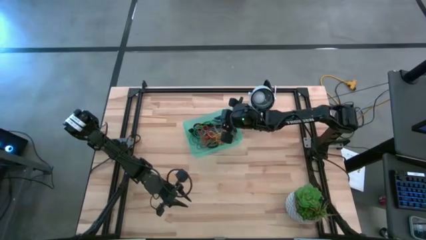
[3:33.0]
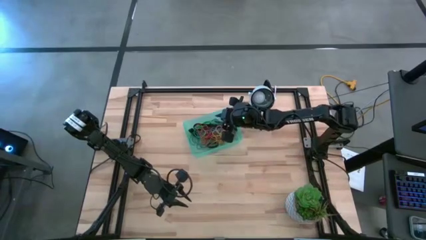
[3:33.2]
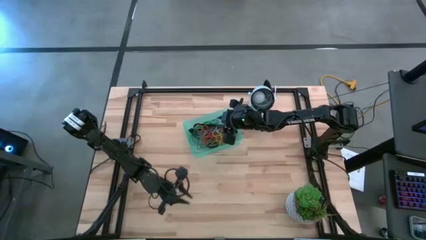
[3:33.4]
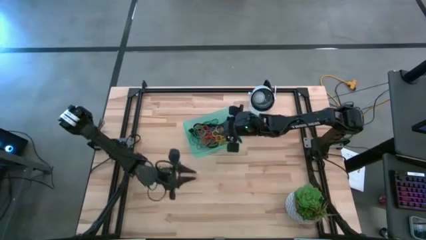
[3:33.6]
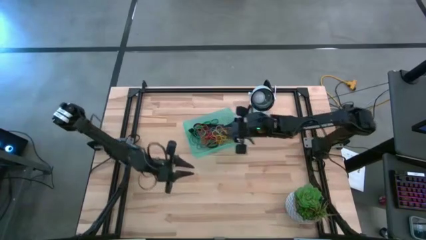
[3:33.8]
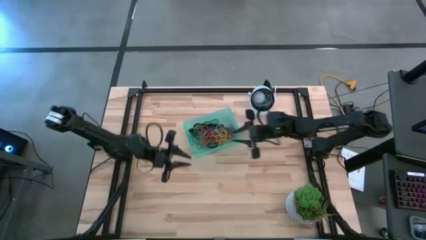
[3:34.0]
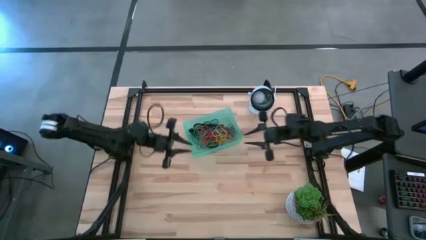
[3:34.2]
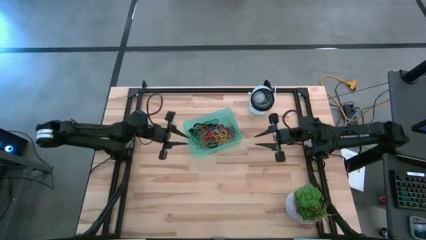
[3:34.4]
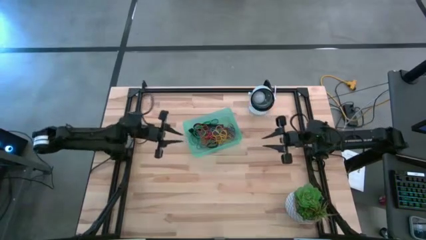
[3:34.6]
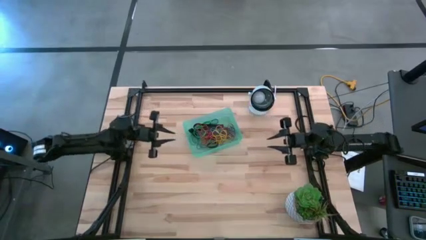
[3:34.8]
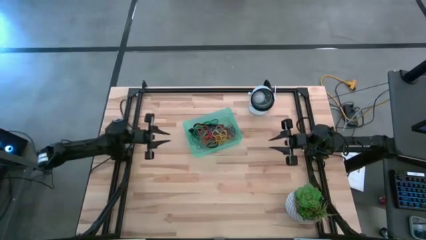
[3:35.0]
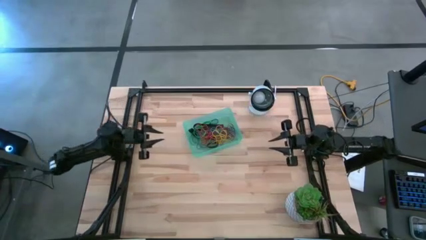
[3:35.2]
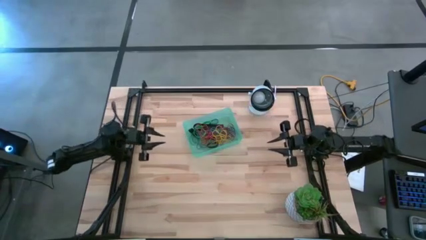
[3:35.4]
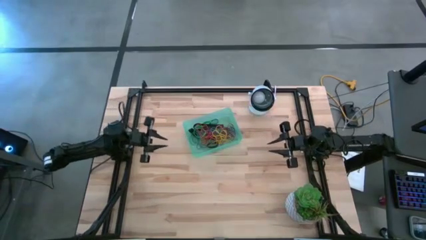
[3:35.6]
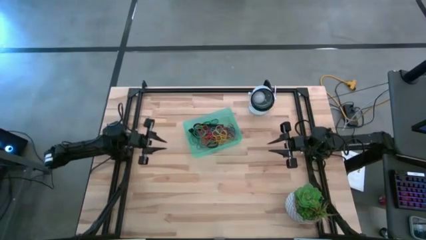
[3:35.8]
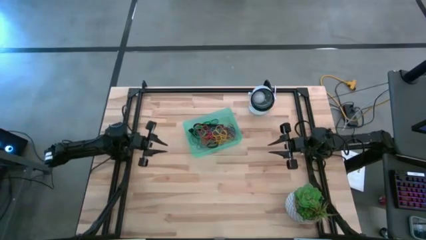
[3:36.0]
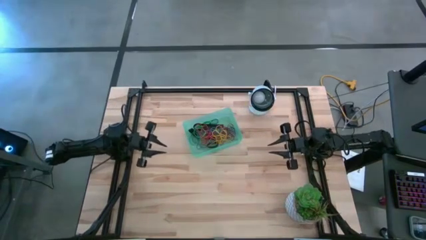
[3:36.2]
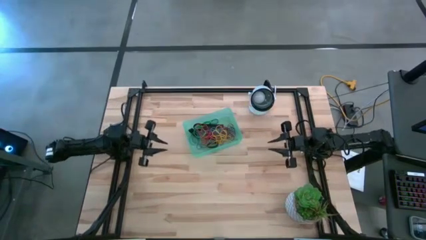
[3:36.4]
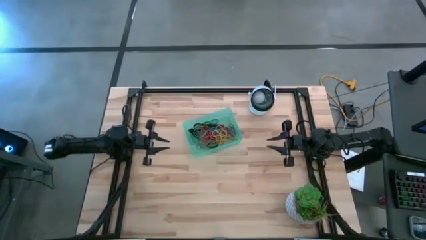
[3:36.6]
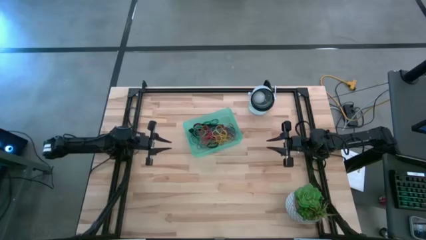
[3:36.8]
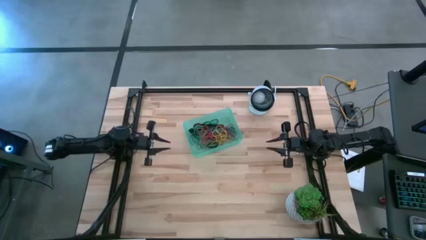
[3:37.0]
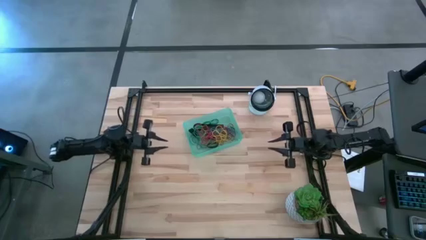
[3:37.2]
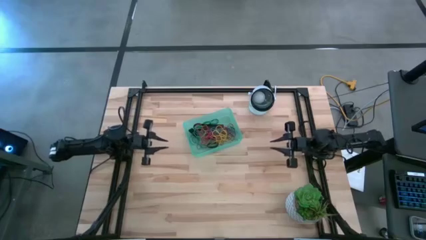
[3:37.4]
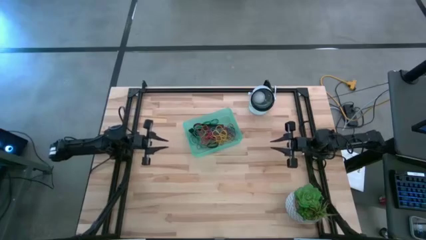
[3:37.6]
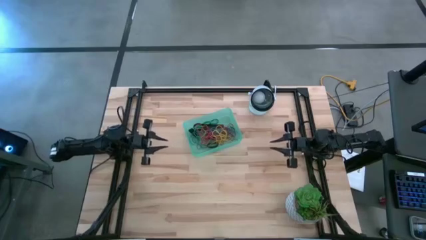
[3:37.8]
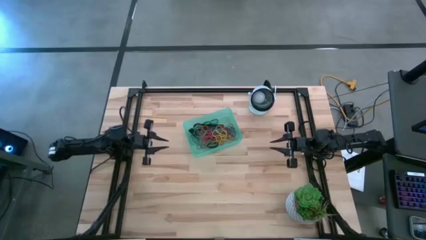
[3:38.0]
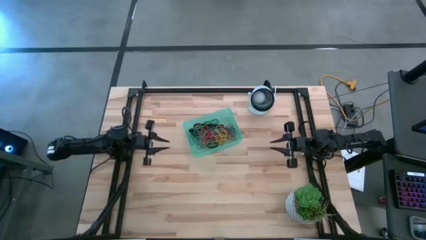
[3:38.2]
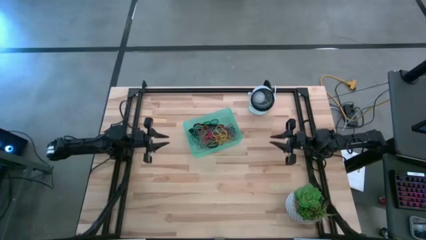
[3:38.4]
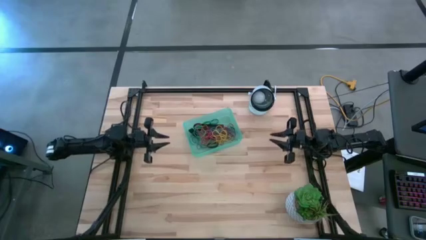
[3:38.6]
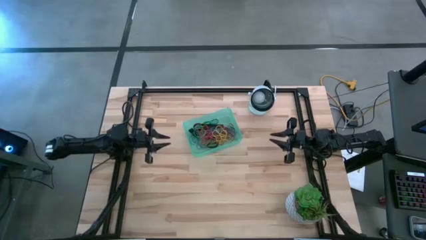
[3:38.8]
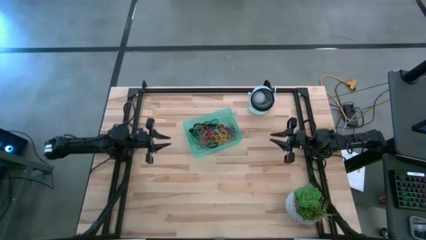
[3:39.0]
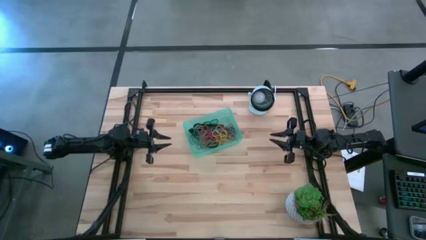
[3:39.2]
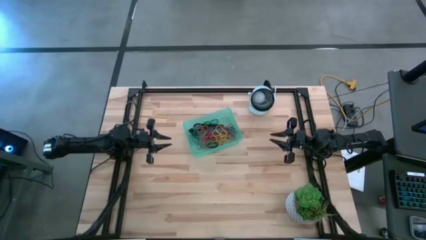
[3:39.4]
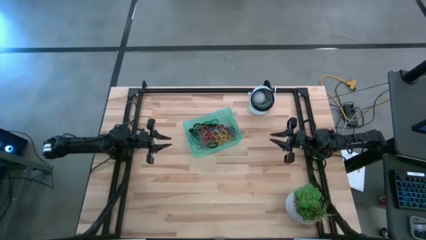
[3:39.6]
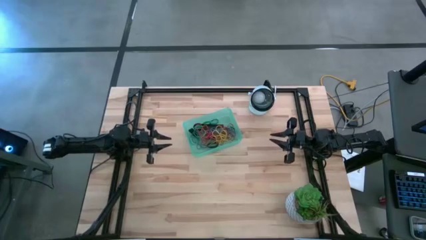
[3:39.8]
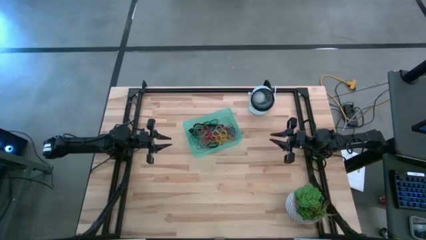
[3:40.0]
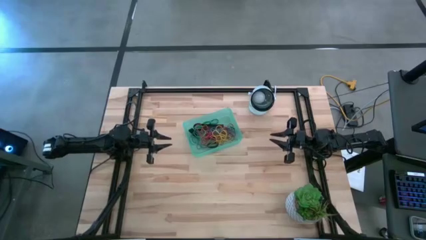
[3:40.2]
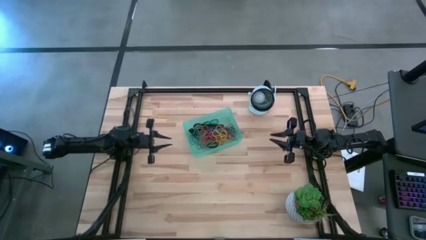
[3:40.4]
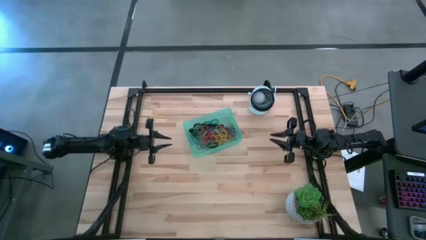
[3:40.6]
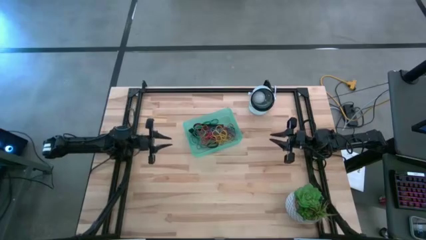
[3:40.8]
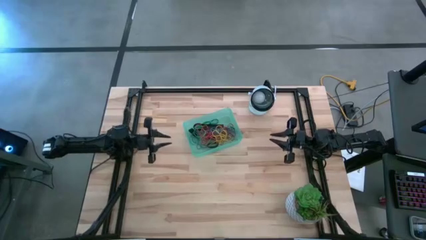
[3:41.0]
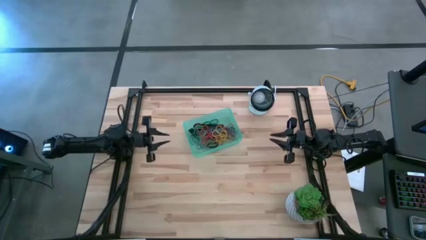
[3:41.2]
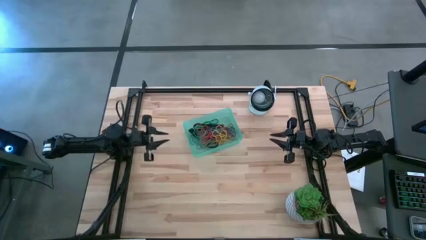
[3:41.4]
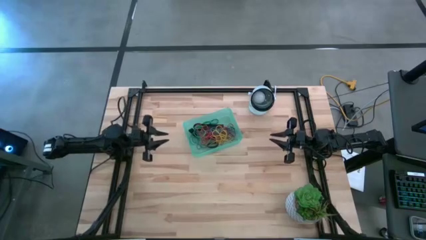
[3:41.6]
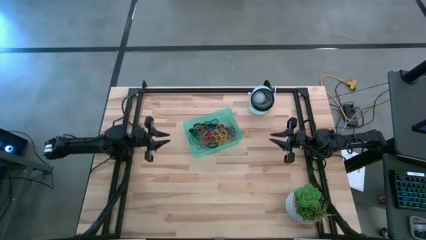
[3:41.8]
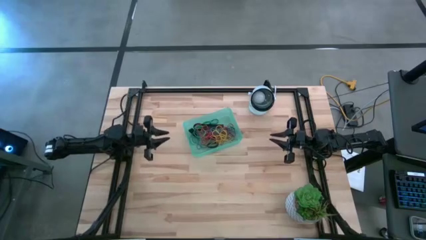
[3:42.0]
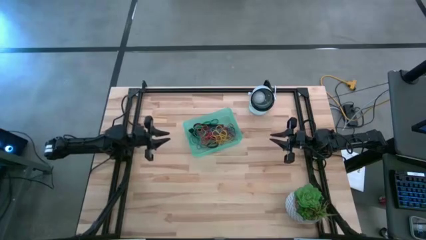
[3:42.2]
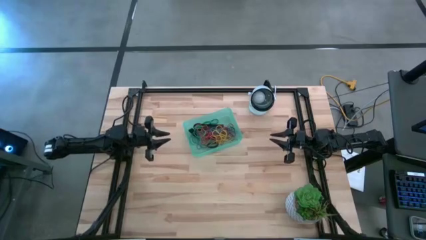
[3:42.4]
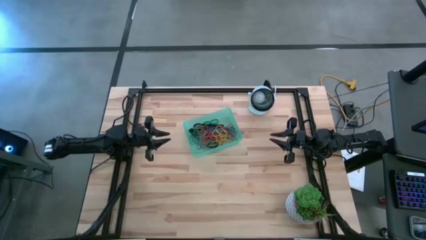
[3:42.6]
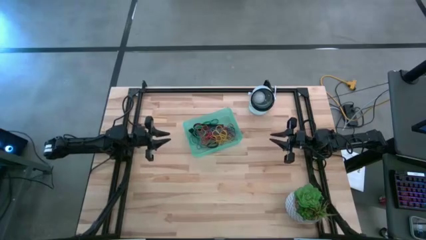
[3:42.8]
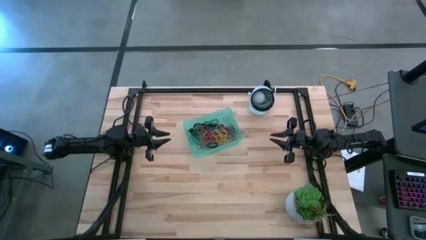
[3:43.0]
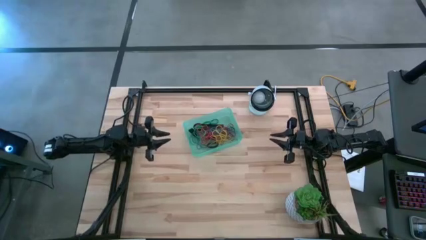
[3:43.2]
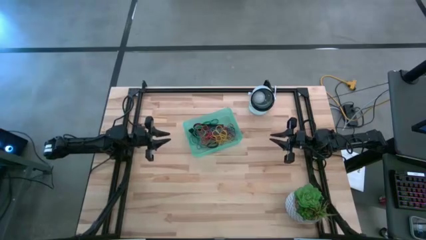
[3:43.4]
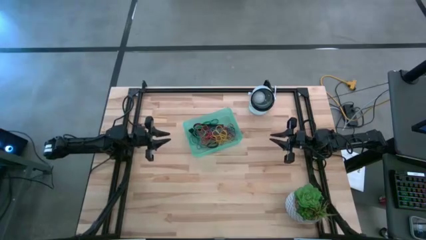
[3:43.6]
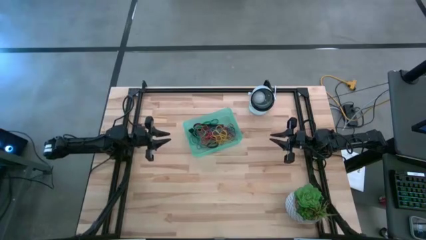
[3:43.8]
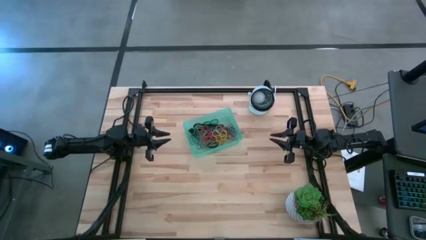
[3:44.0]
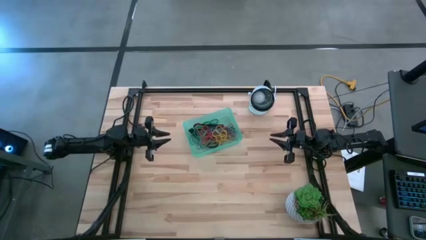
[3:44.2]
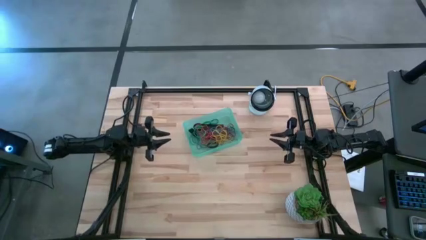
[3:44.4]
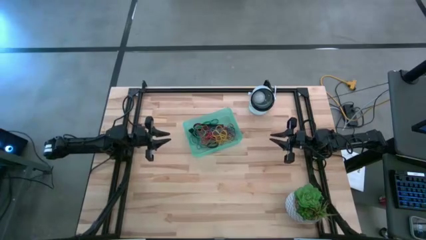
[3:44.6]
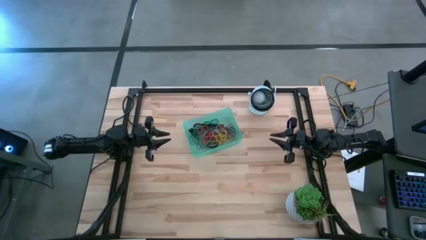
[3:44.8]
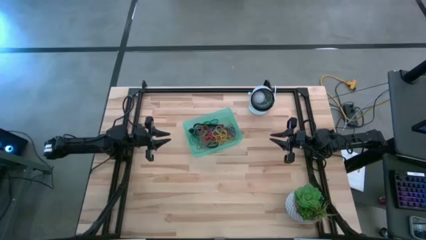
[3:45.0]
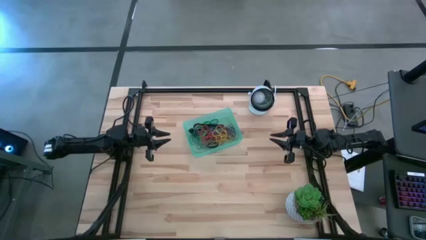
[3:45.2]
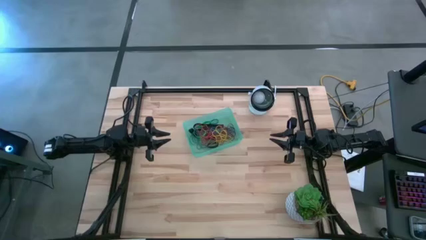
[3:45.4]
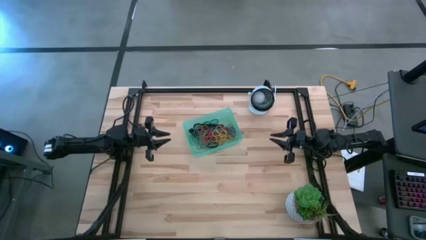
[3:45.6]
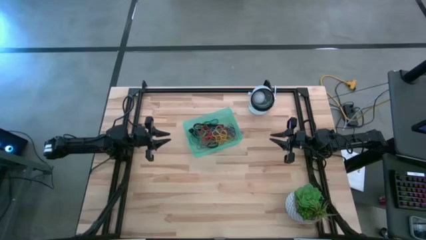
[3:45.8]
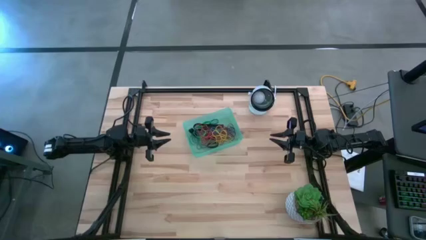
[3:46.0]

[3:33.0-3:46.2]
Task: Pick and place rubber bands into bin
Return to Home Position
